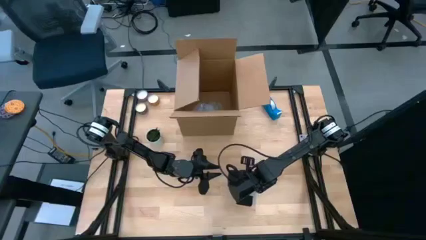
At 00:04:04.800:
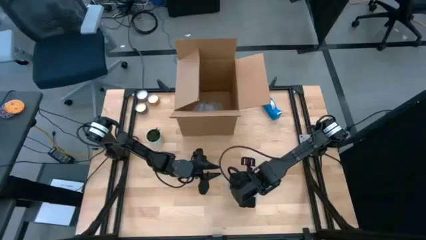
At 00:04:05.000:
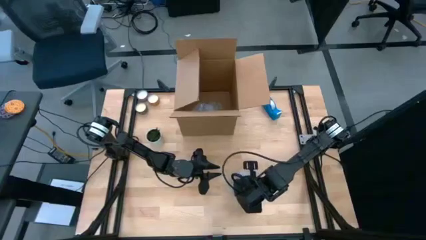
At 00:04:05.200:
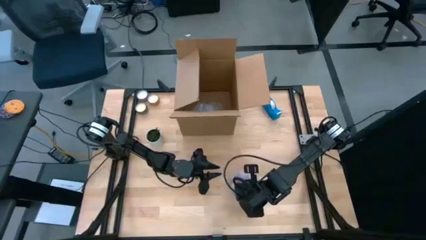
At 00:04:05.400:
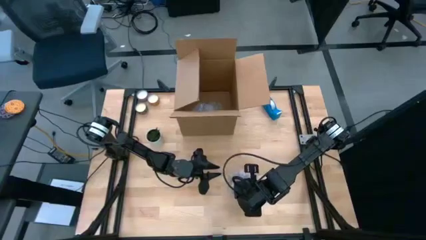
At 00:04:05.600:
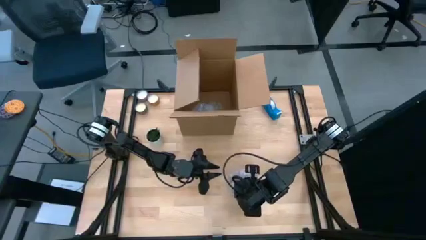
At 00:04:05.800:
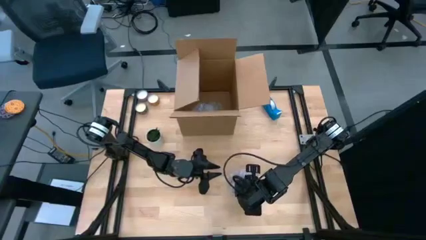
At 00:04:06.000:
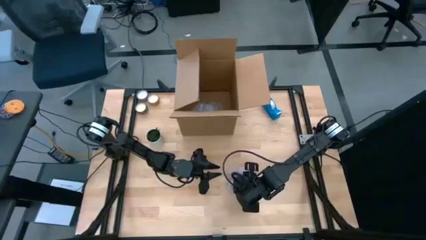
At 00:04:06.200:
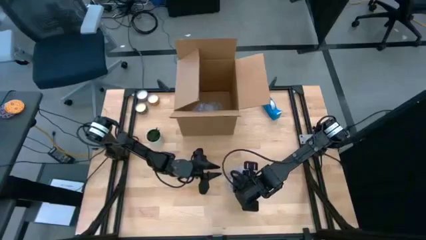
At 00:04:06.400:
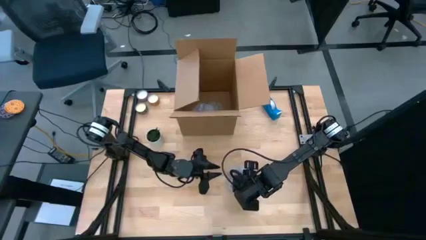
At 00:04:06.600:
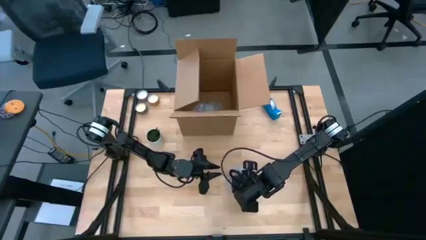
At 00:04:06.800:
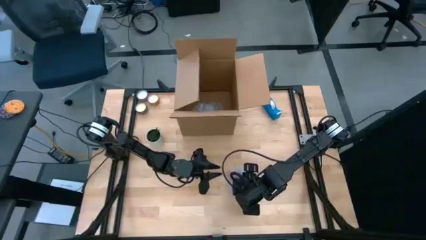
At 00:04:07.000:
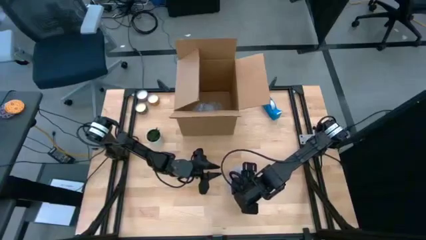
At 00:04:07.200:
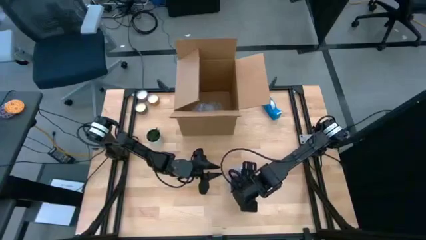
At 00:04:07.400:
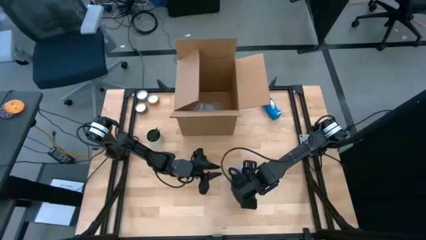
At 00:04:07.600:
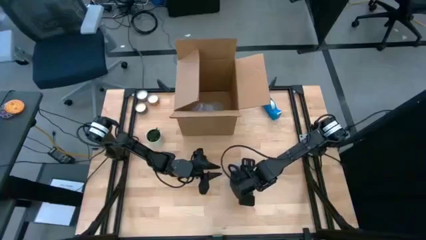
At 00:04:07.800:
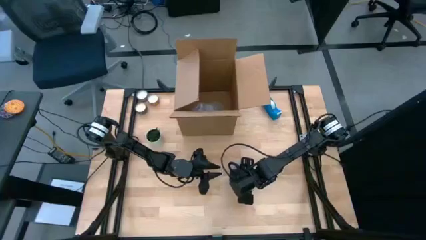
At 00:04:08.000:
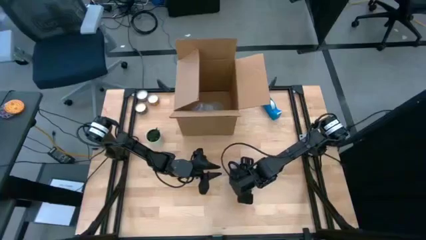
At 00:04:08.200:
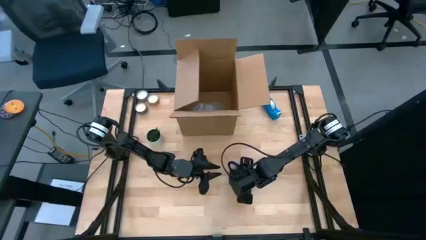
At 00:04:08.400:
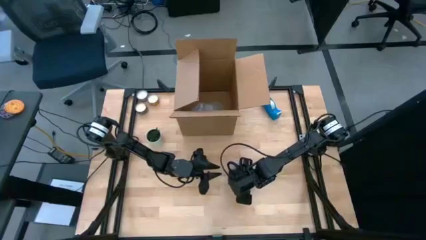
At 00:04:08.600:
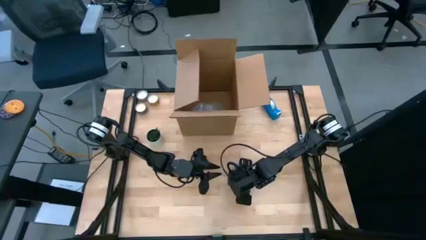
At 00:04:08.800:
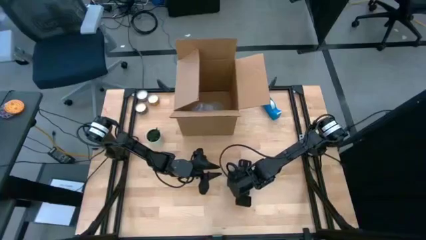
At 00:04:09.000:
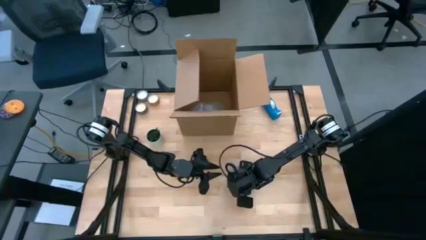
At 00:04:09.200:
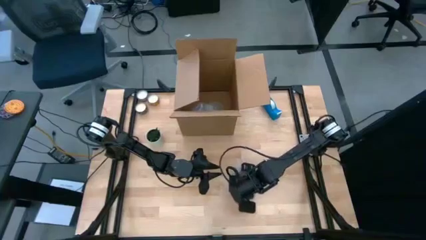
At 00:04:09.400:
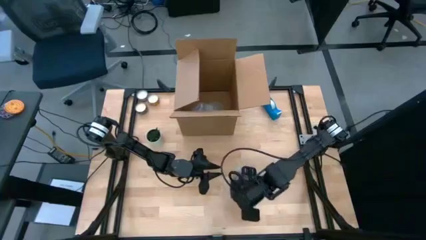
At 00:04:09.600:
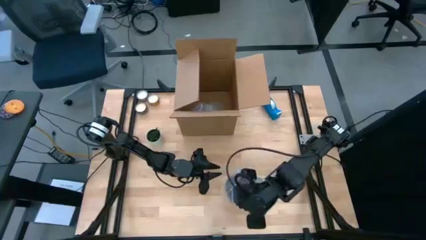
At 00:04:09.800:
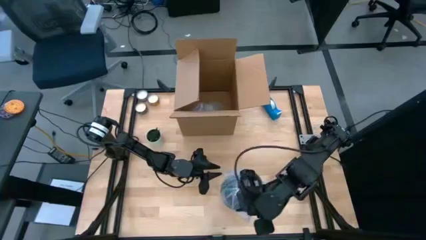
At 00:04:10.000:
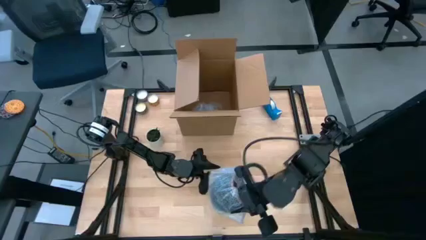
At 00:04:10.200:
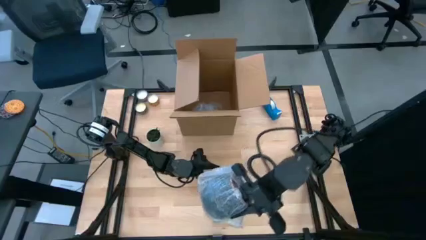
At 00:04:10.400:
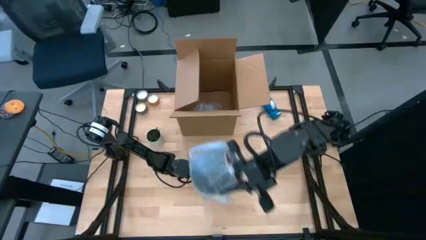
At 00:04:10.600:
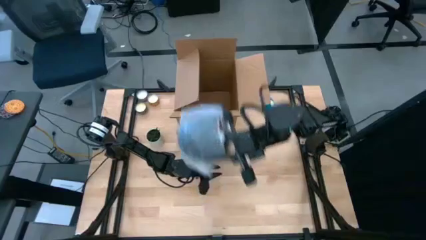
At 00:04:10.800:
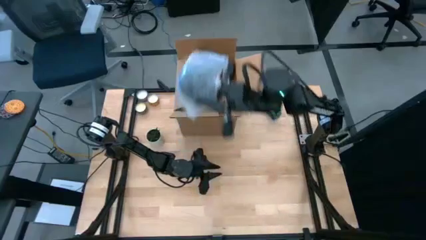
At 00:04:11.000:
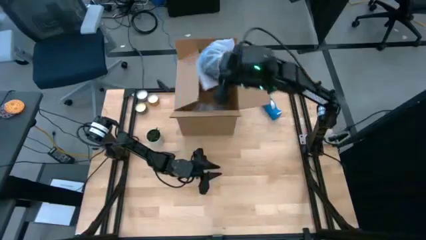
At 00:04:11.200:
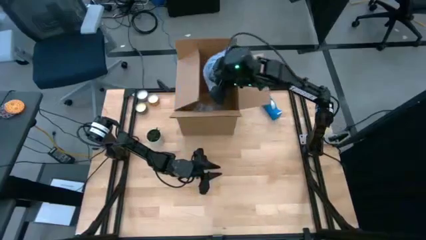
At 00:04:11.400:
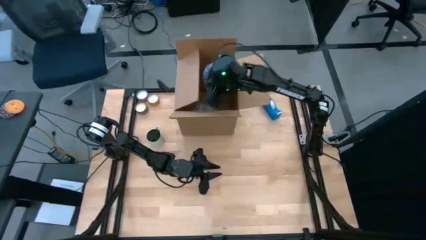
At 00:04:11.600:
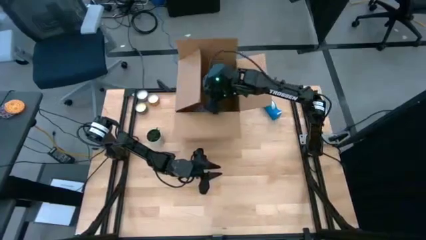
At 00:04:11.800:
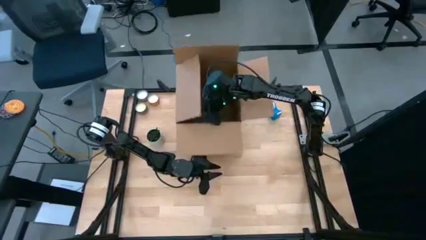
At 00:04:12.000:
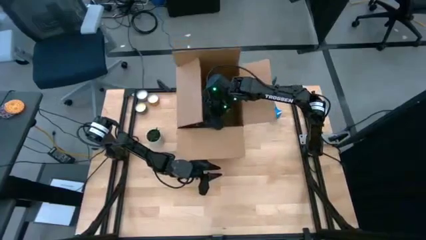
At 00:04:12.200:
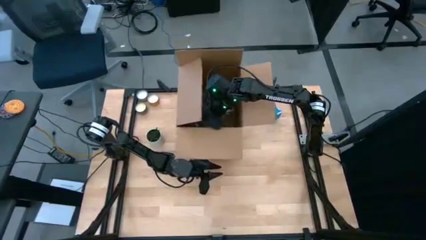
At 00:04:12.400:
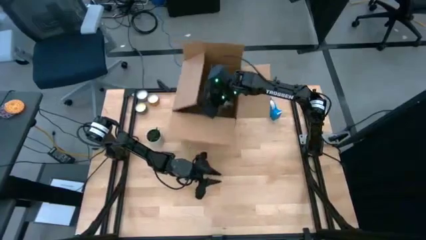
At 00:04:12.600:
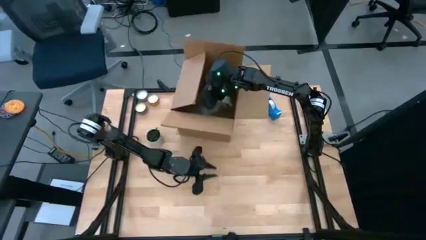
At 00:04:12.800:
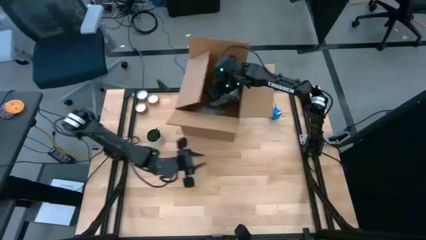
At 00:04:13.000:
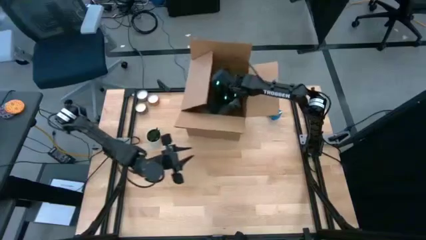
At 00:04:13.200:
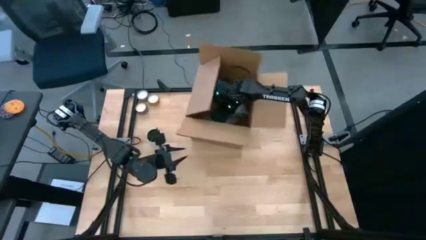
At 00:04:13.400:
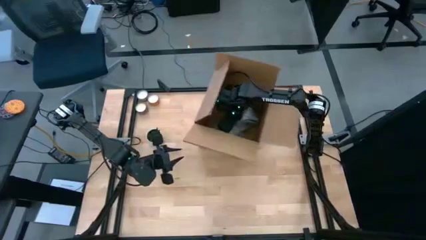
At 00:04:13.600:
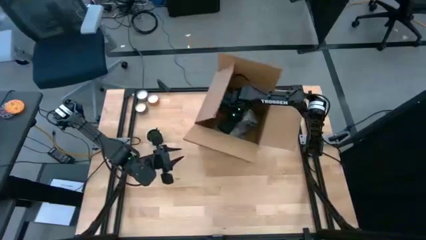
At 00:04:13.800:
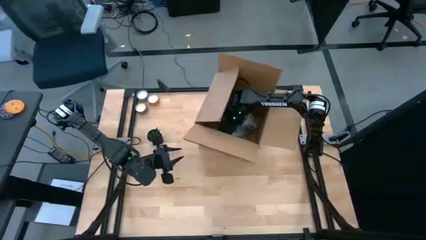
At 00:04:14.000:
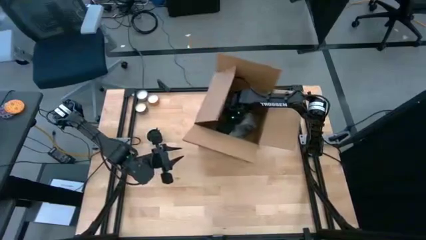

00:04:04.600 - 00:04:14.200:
Task: wrap mug
Put the wrapped black cup into the cardboard box

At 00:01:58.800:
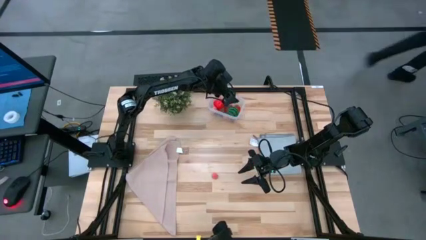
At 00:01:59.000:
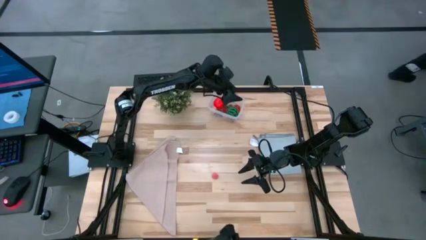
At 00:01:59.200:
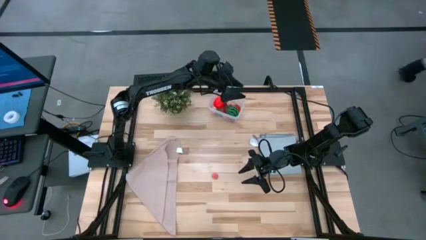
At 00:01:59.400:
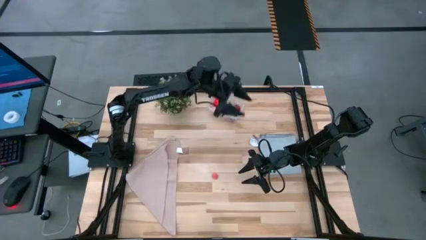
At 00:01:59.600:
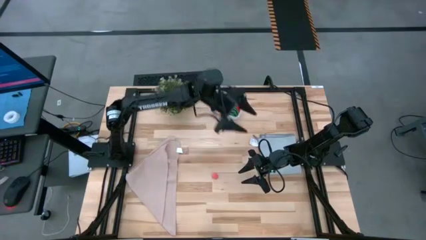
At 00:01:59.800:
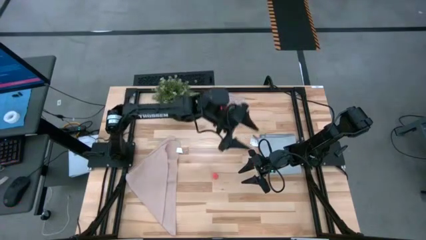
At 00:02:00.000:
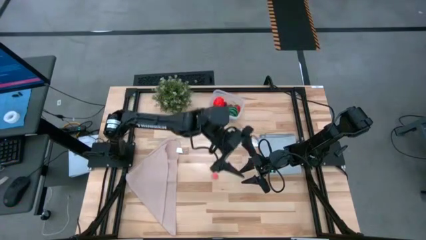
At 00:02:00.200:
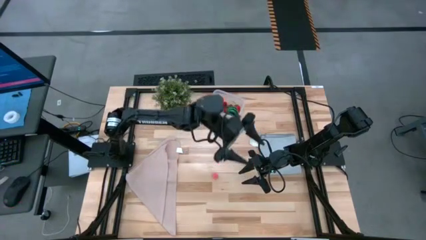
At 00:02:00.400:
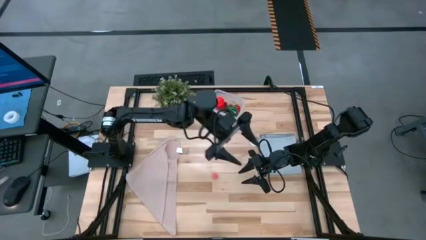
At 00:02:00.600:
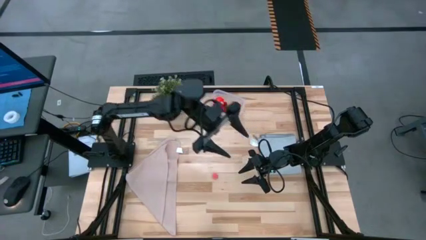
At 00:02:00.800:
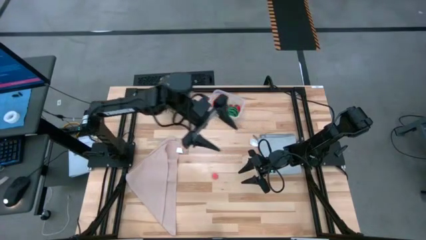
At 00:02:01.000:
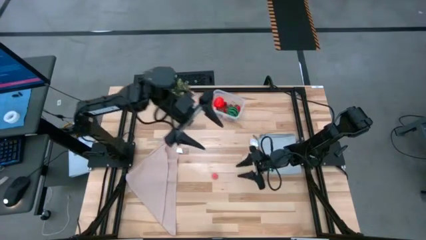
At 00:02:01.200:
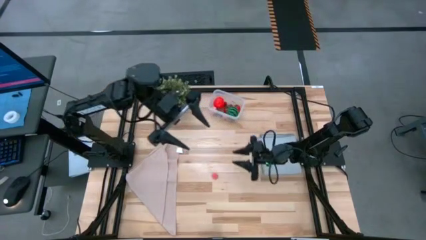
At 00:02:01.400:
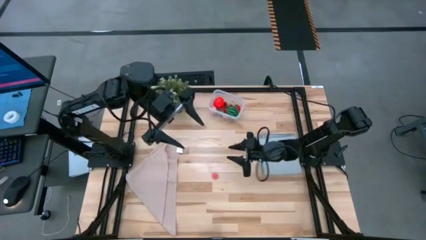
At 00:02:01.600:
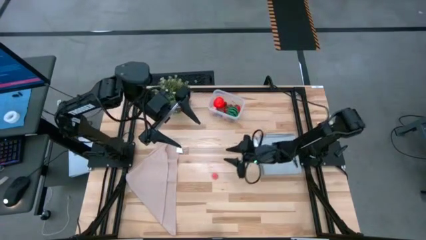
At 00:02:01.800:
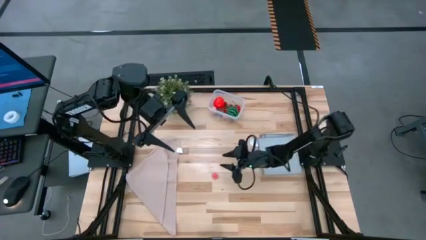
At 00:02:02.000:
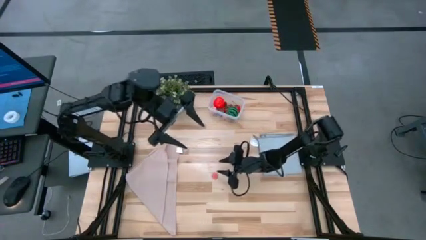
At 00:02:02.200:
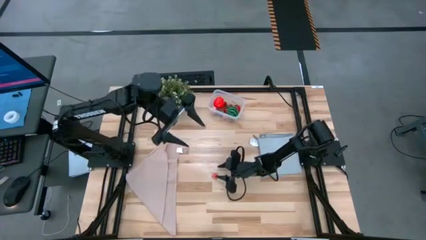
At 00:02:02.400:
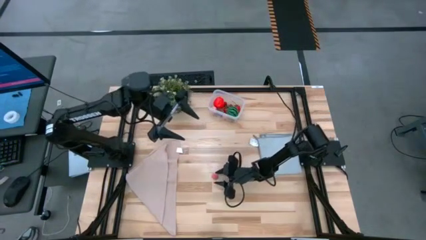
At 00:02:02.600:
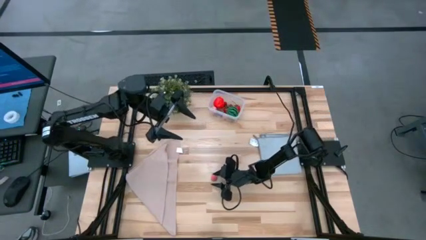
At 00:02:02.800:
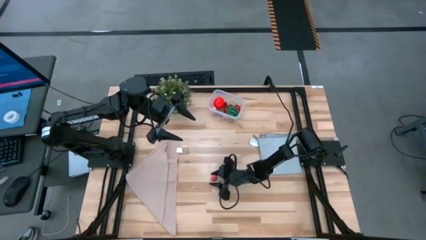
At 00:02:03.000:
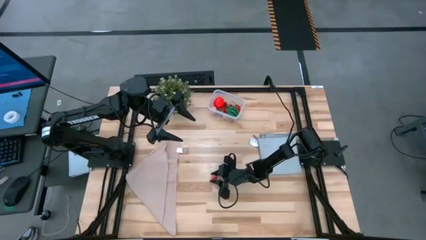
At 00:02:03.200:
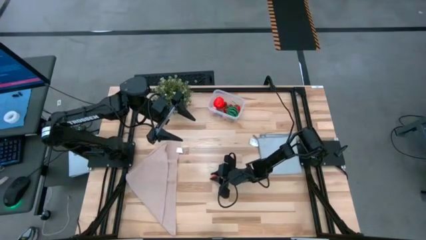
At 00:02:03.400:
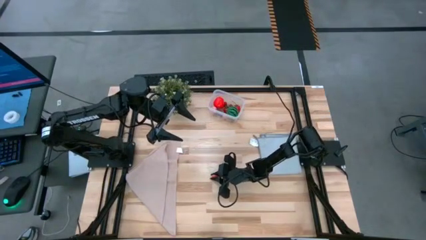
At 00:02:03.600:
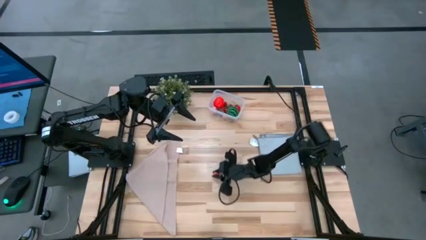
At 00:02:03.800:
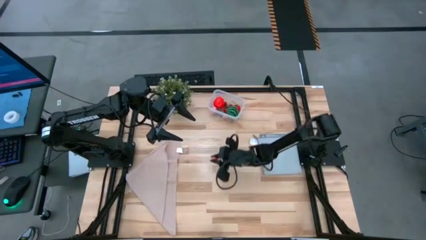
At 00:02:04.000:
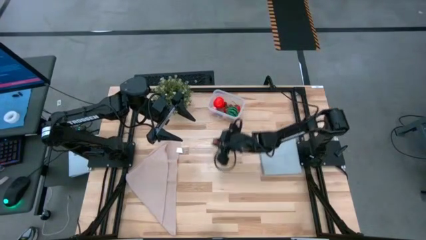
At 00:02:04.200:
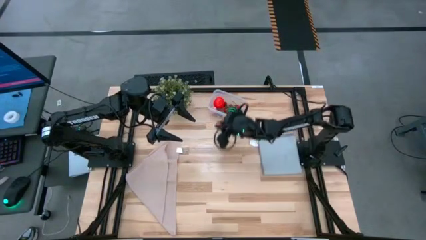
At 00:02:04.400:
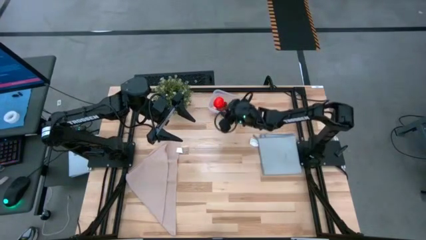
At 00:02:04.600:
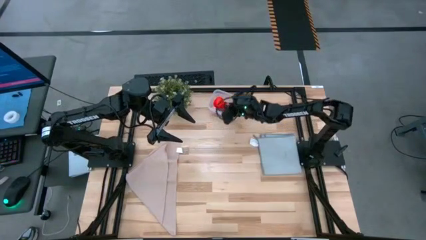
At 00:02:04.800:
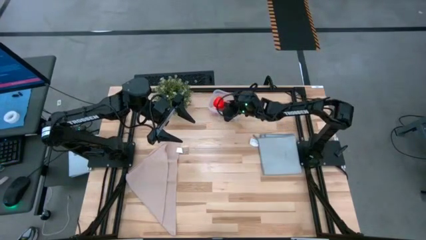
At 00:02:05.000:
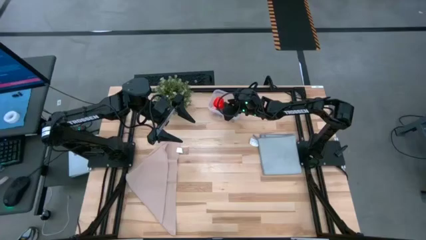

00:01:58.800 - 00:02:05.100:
Task: Pick and placing Produce into tupperware
Put the peach into the transparent bin
